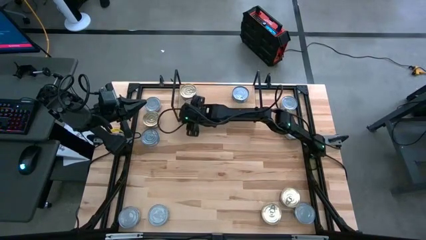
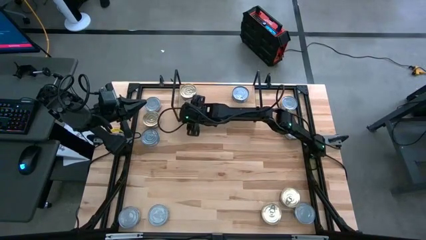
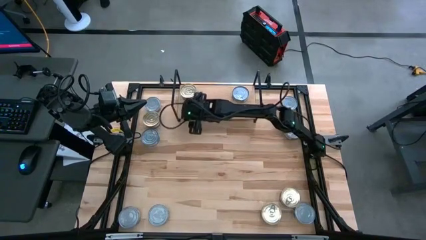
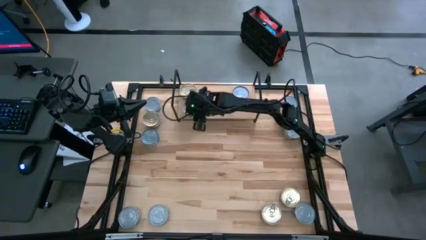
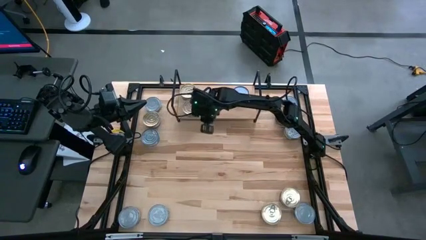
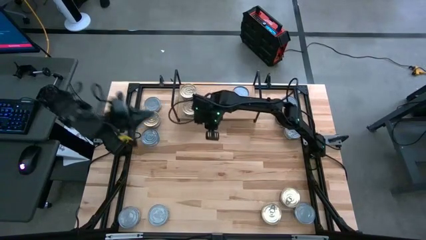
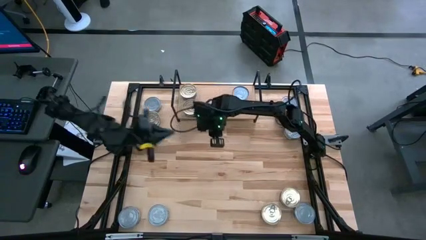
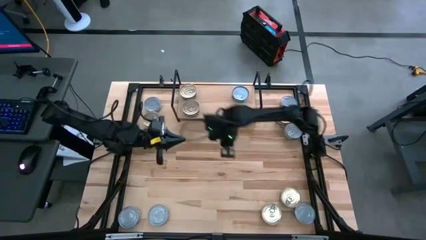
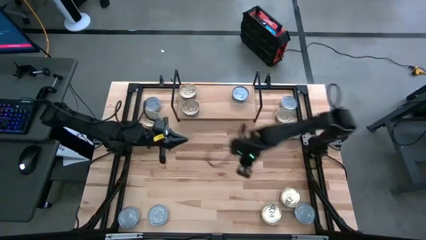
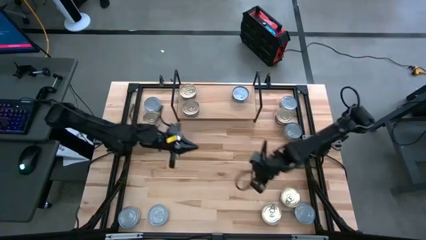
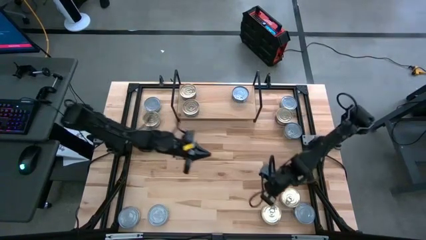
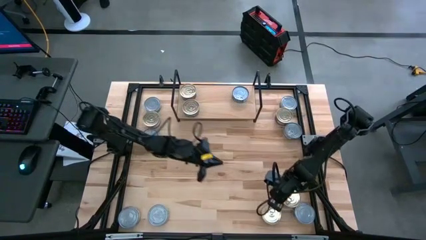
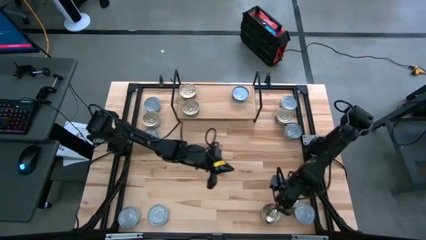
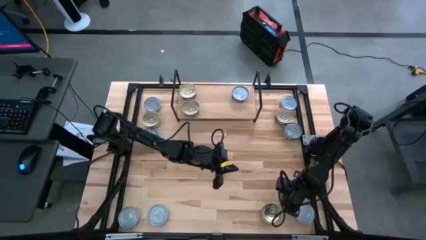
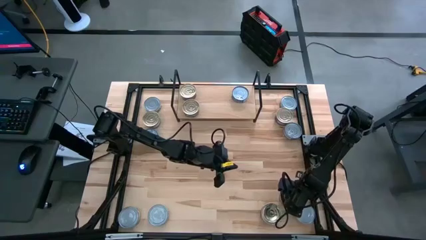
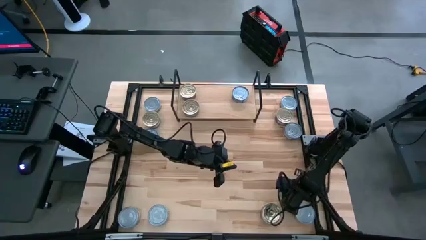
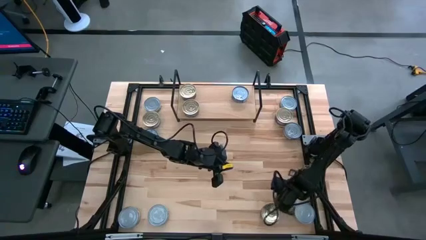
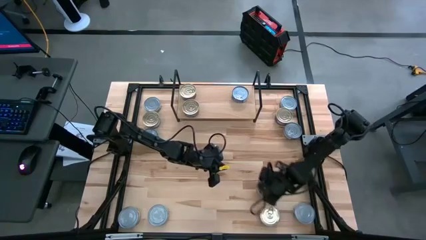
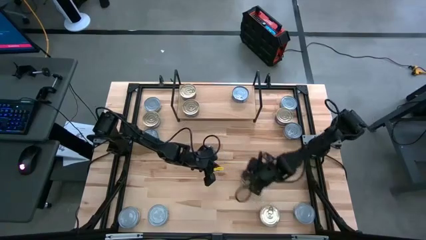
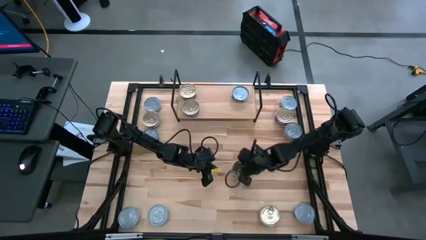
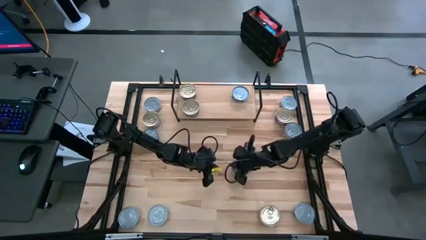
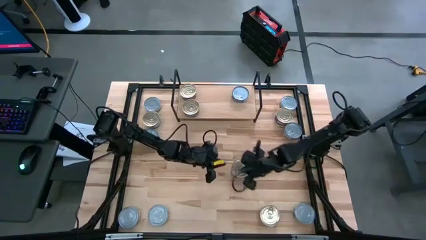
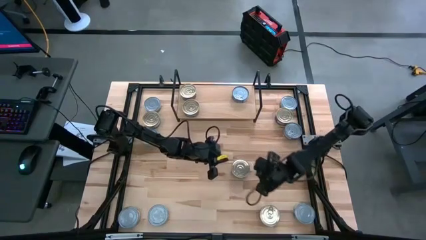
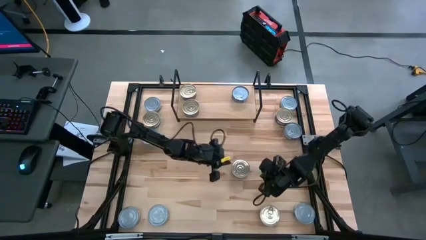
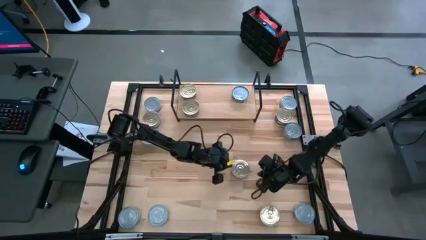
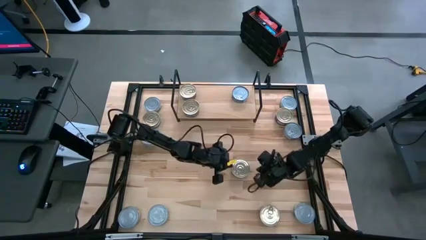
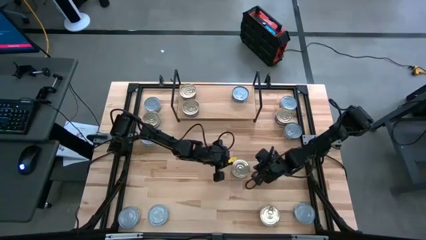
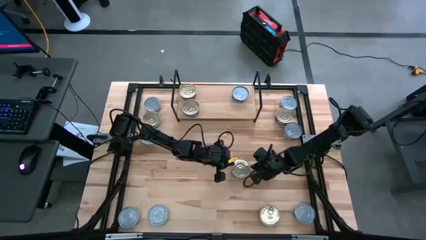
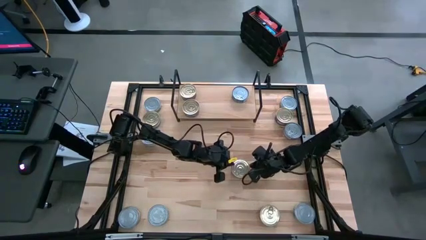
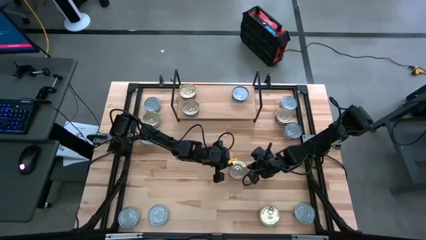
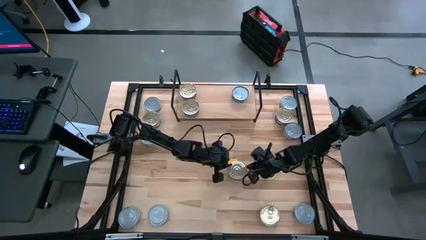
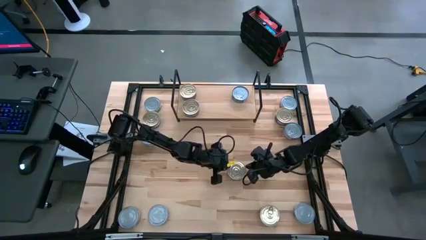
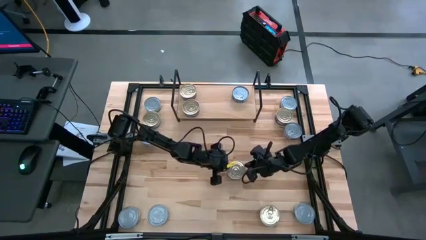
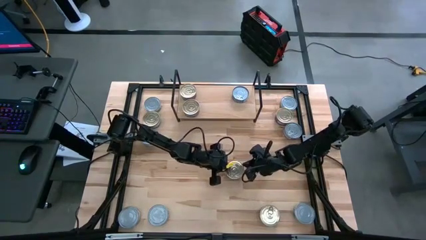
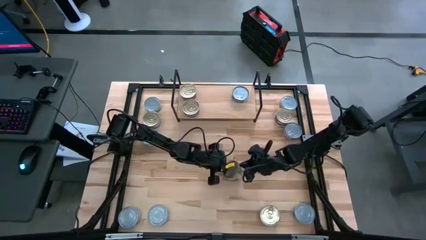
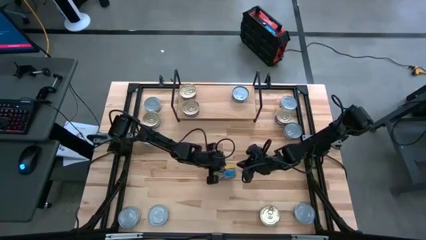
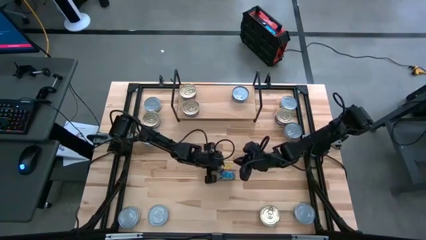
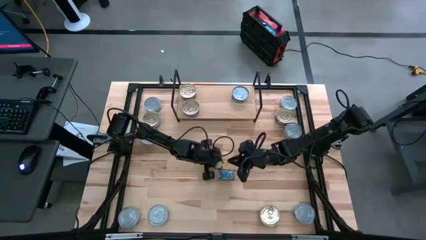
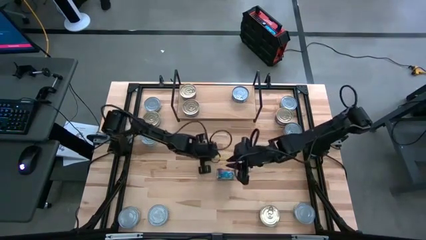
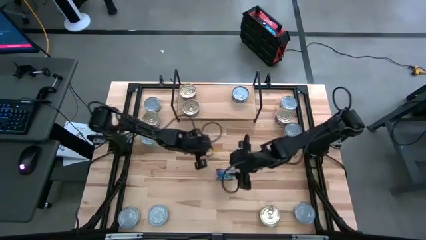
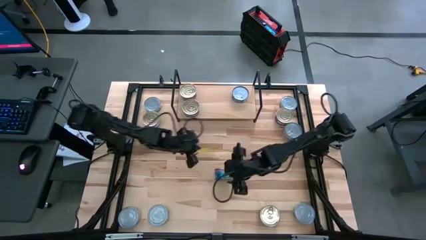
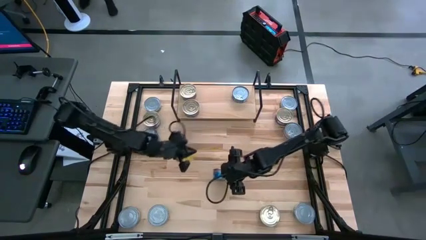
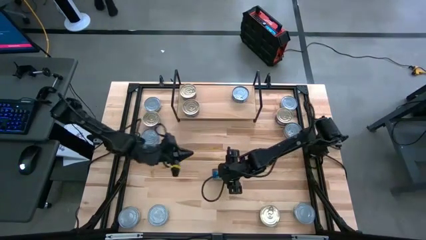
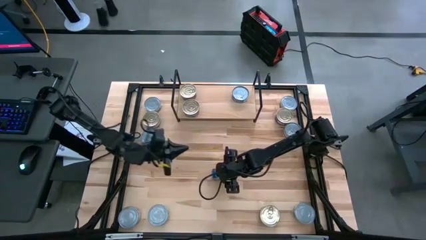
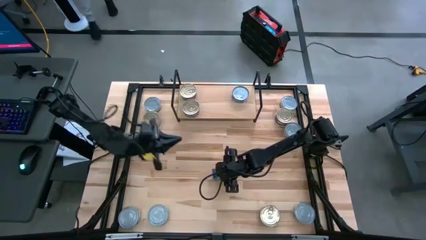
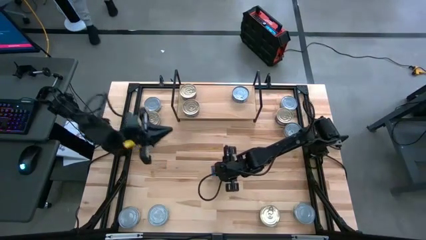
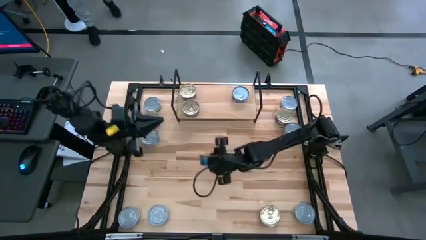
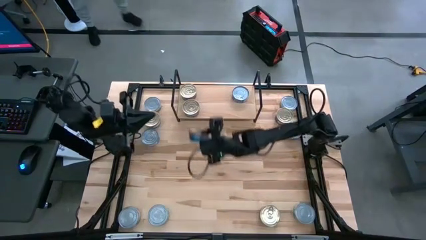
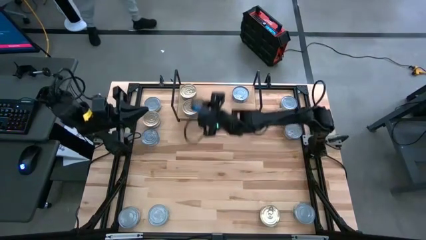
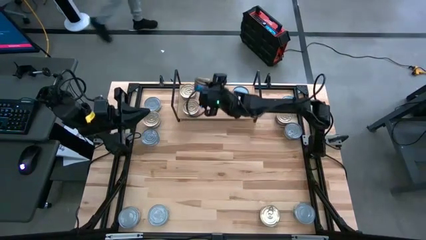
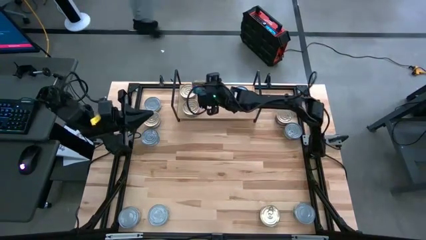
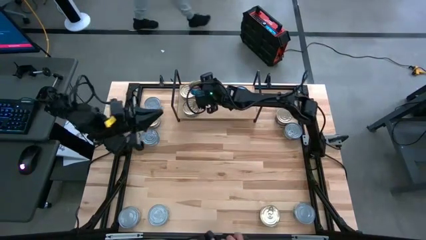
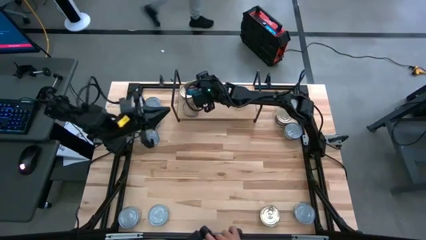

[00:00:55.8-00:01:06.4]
Task: Stack canned seafood by type on shelf
Stack the blue pink tuna can on top of the other blue pink tuna can on the shelf

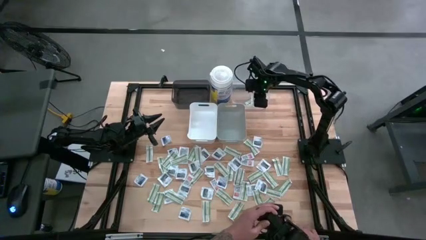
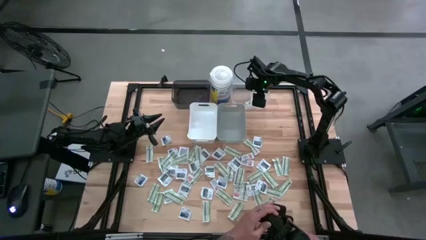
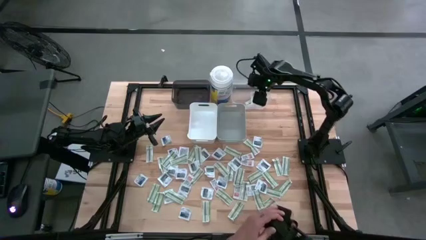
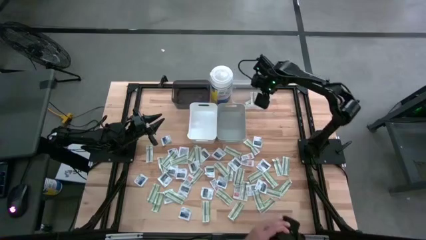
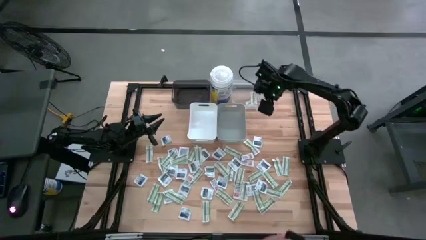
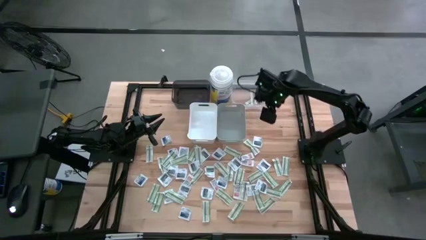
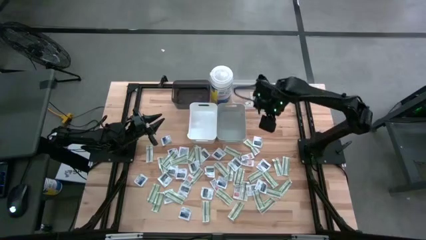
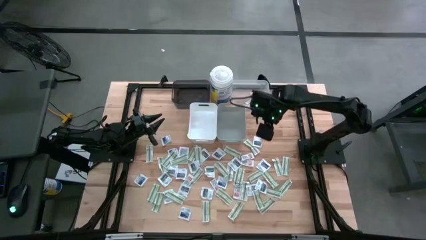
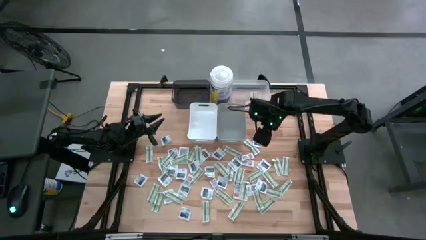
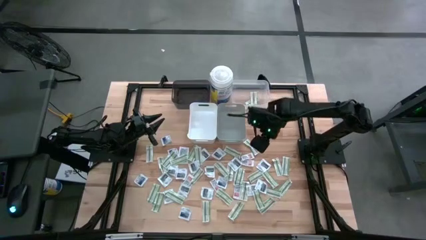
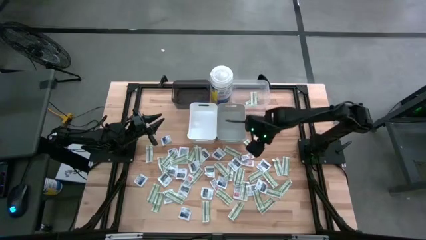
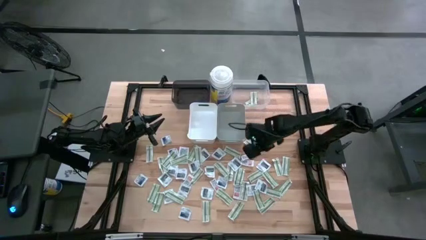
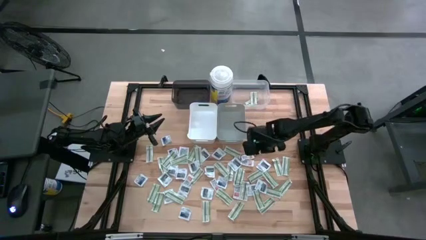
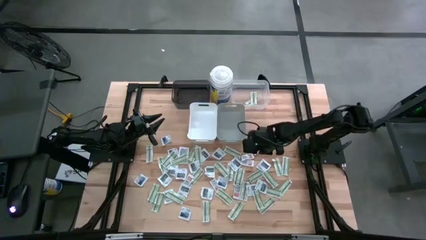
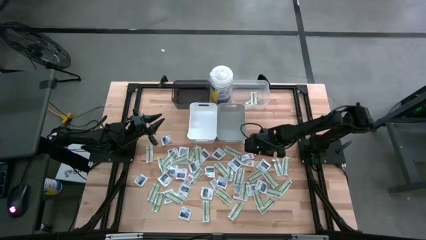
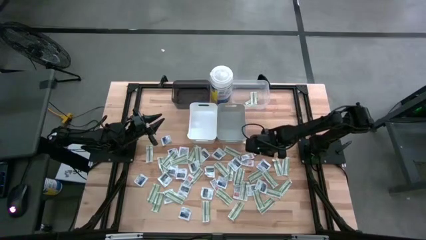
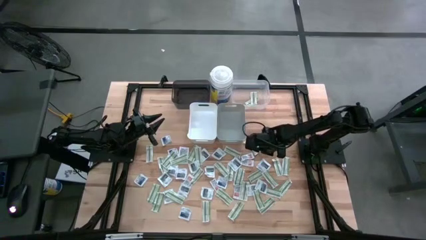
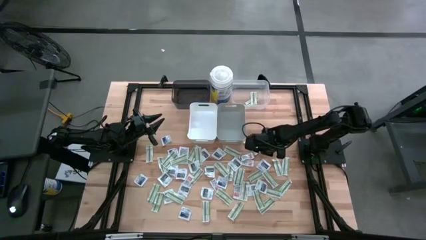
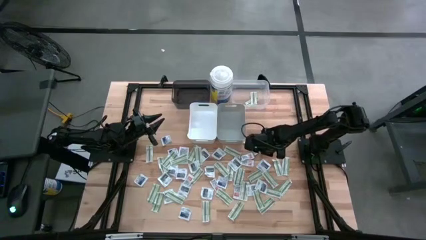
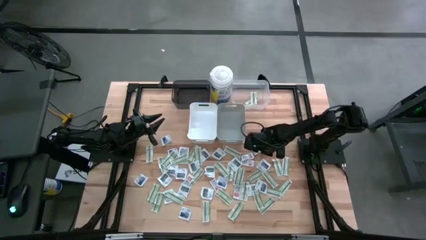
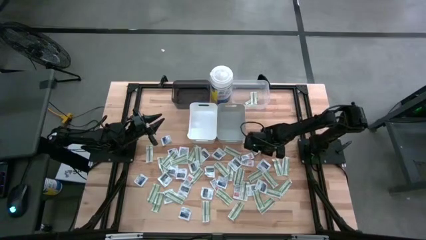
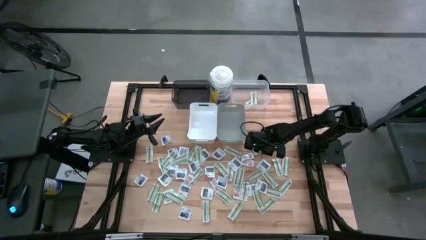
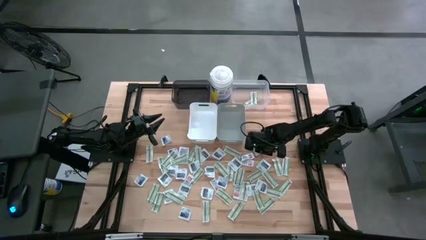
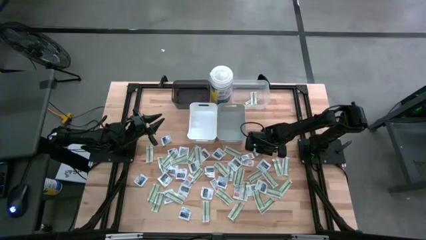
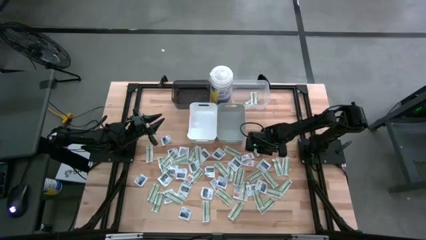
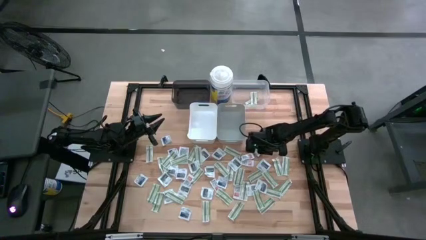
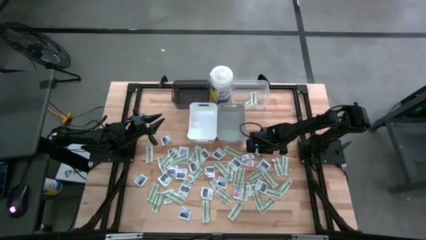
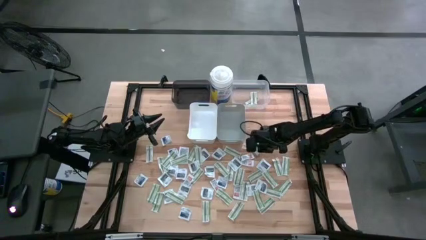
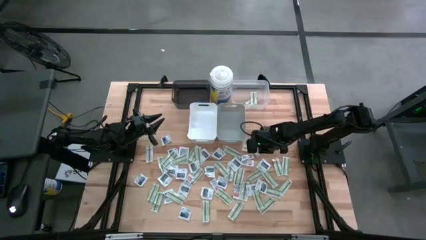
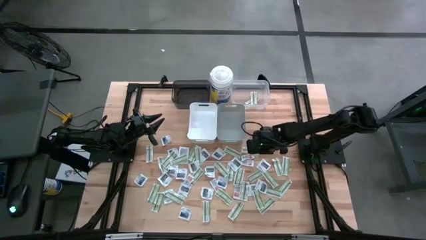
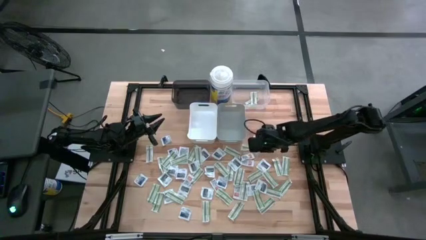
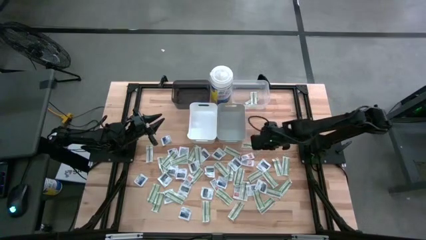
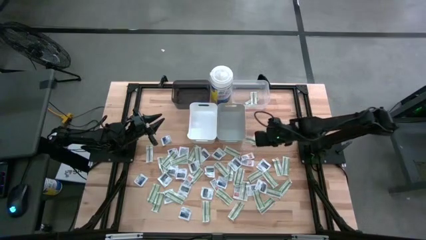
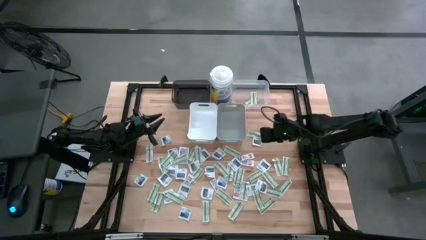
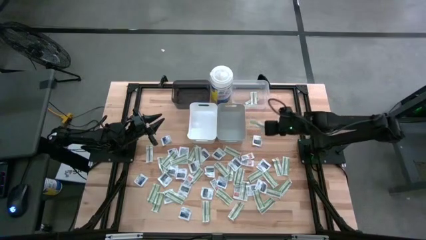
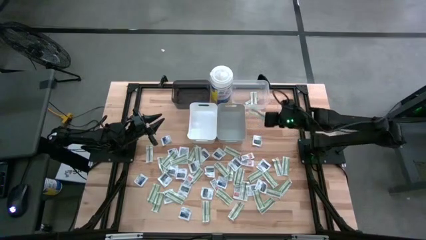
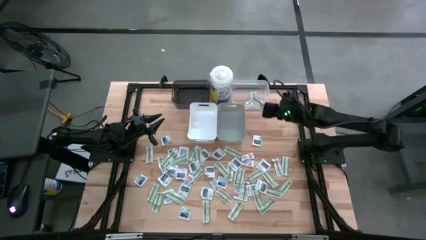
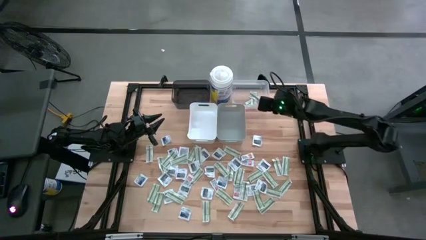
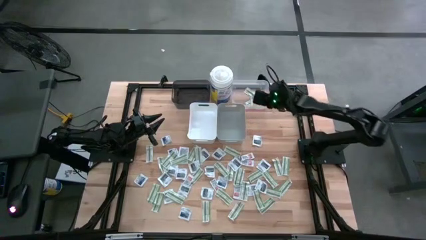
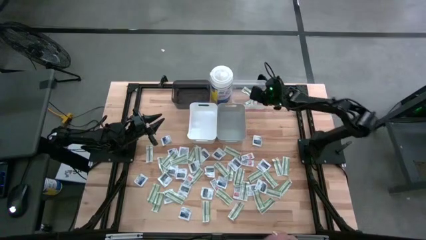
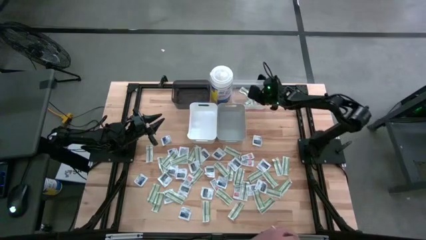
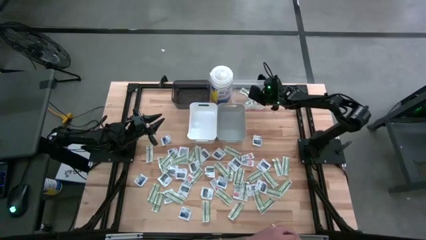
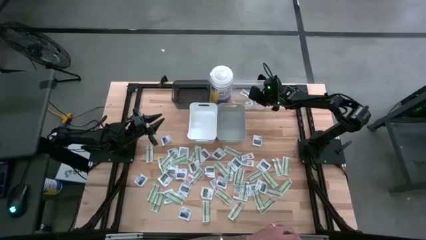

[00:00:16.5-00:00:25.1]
Task: Pick & Place First Aid Supplies
Put the band aid into the transparent bin
